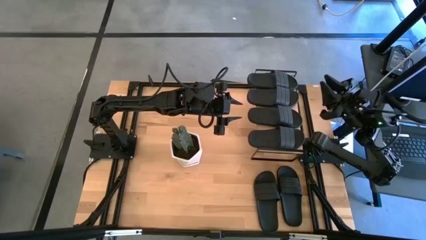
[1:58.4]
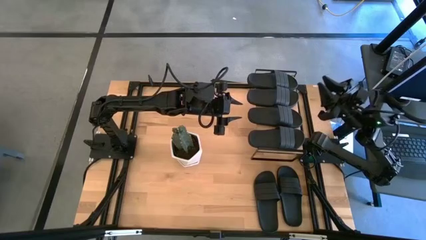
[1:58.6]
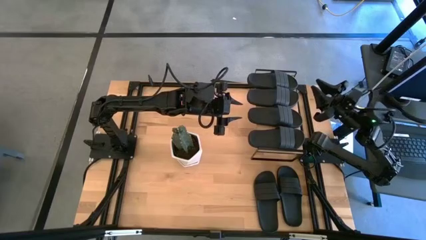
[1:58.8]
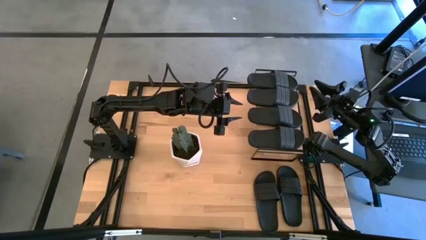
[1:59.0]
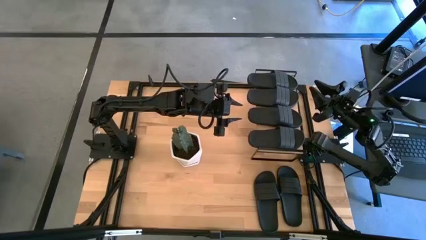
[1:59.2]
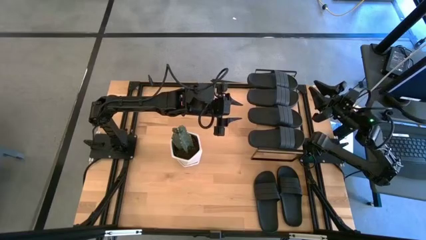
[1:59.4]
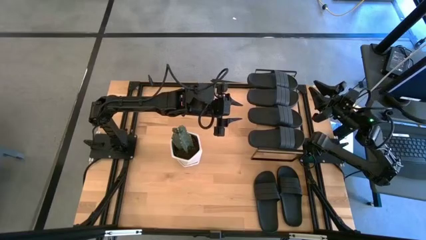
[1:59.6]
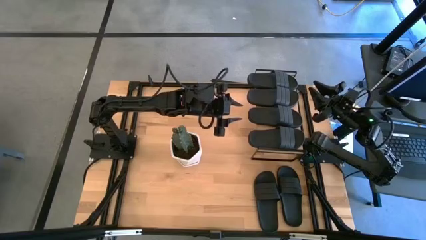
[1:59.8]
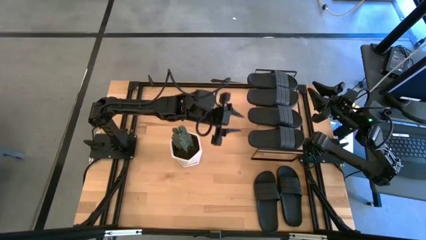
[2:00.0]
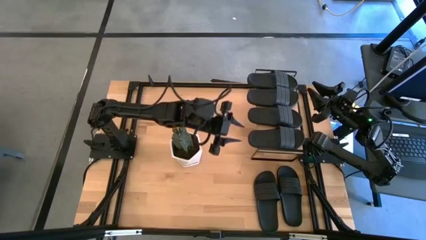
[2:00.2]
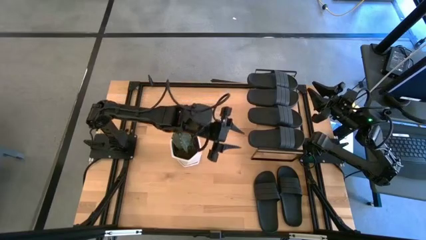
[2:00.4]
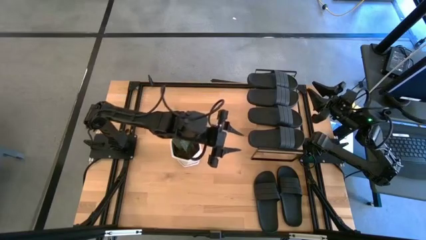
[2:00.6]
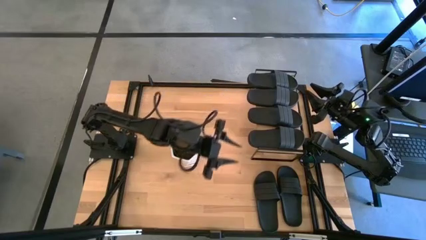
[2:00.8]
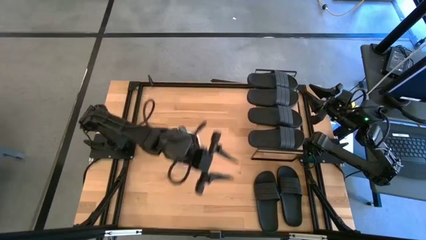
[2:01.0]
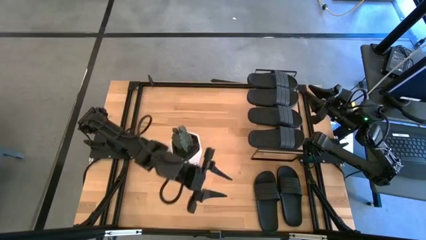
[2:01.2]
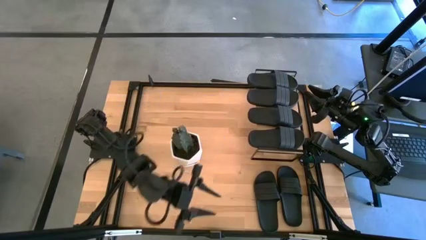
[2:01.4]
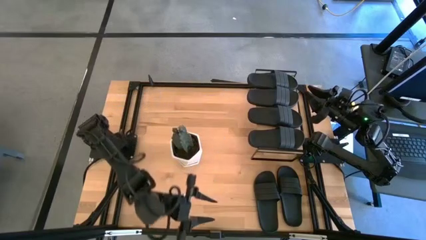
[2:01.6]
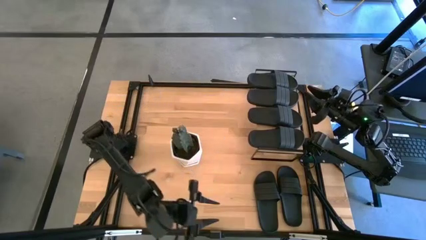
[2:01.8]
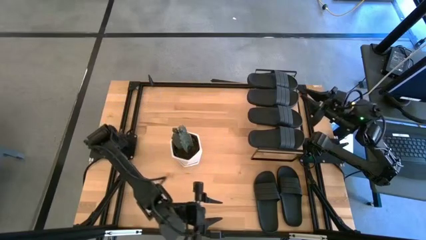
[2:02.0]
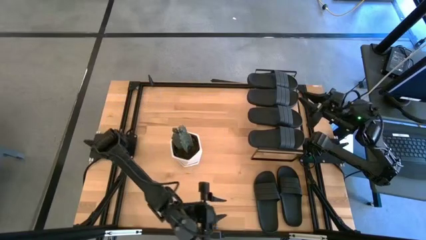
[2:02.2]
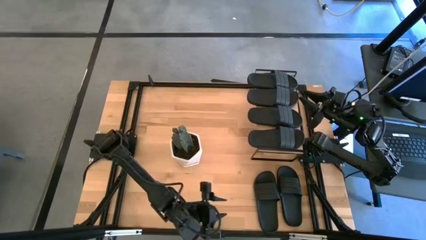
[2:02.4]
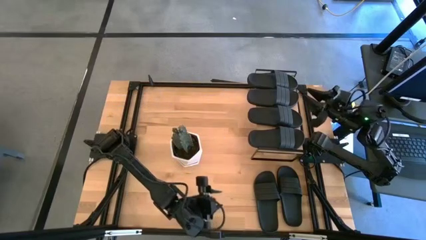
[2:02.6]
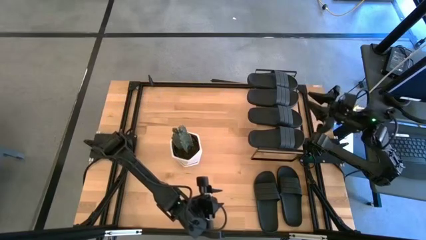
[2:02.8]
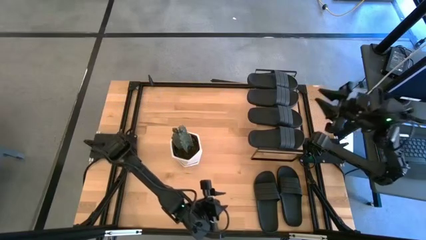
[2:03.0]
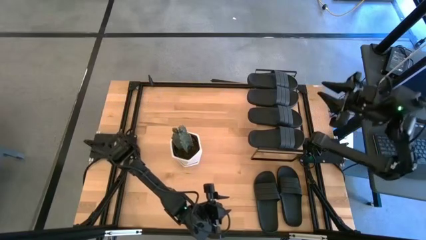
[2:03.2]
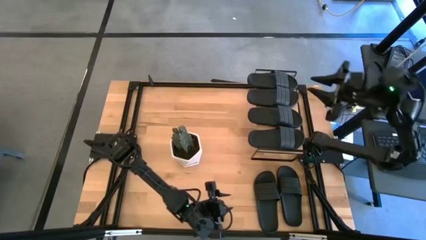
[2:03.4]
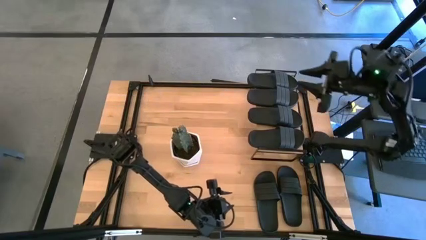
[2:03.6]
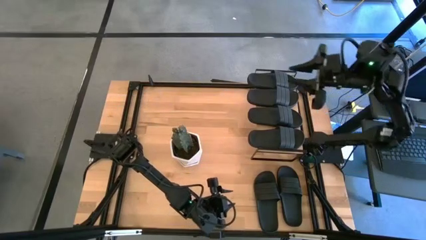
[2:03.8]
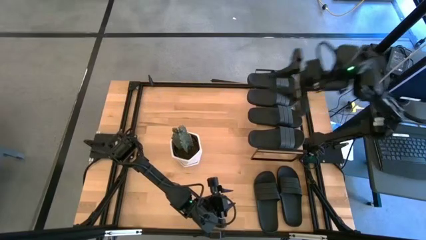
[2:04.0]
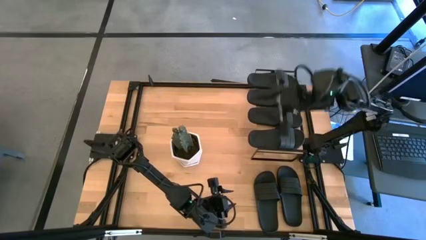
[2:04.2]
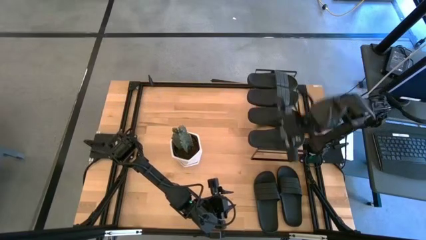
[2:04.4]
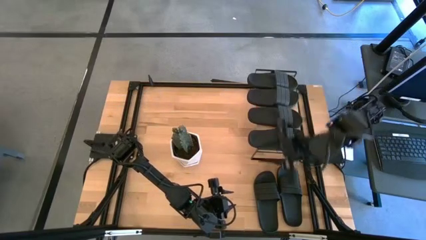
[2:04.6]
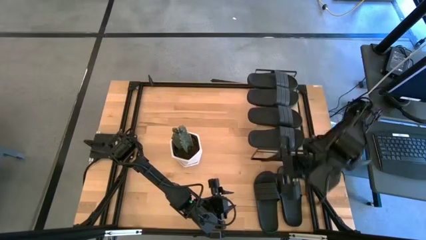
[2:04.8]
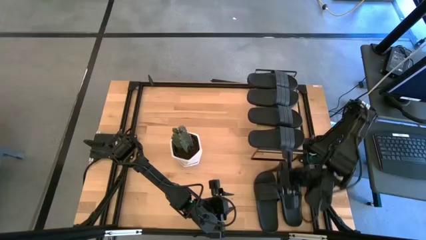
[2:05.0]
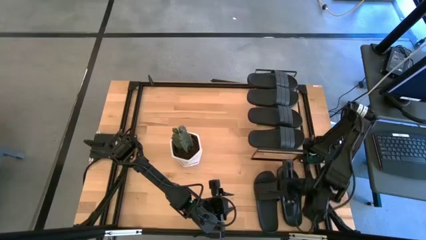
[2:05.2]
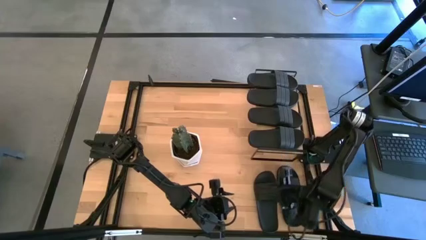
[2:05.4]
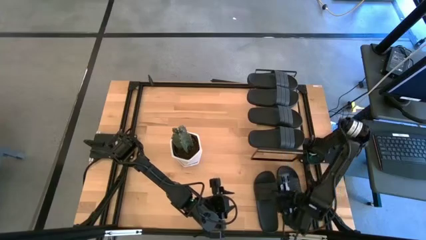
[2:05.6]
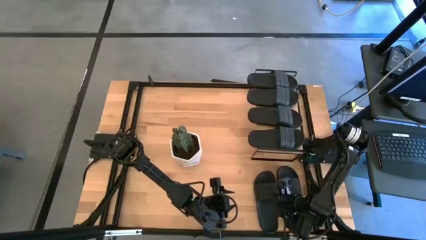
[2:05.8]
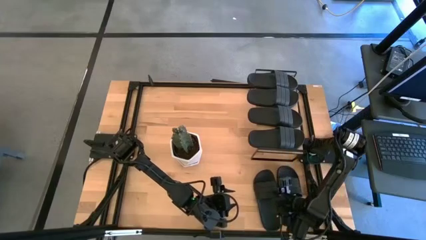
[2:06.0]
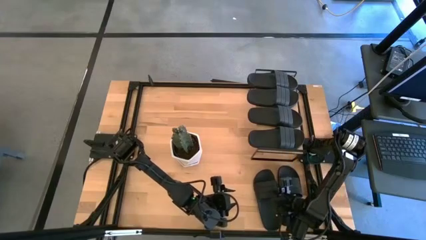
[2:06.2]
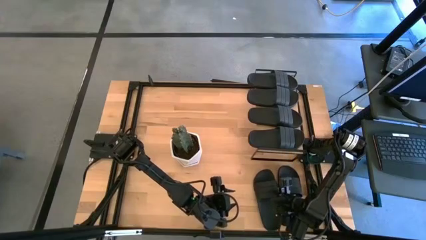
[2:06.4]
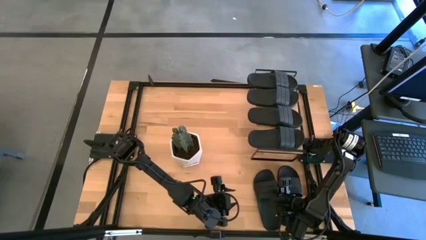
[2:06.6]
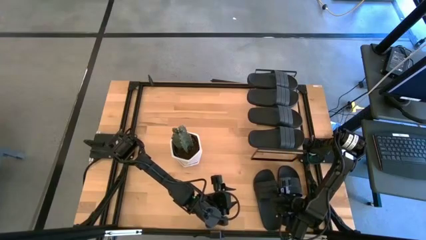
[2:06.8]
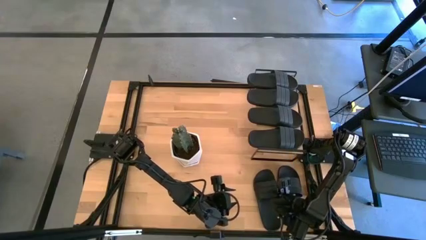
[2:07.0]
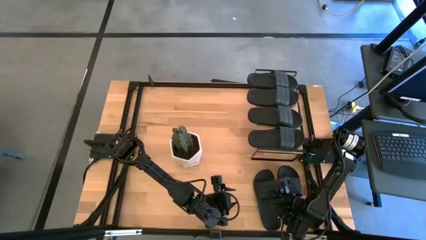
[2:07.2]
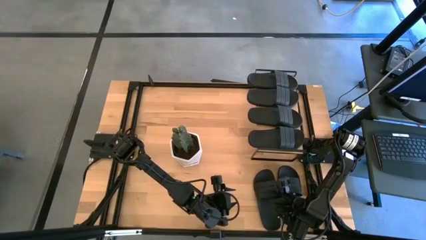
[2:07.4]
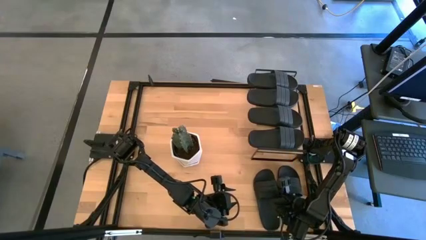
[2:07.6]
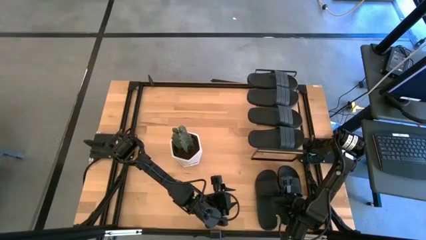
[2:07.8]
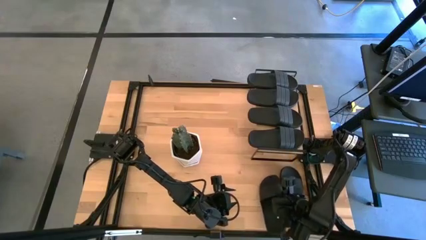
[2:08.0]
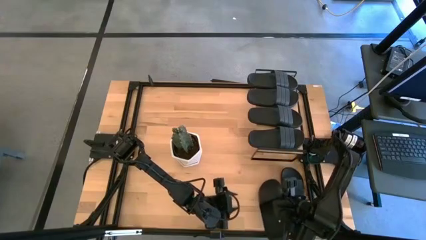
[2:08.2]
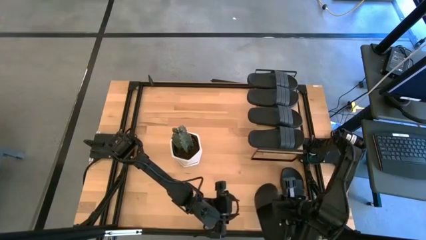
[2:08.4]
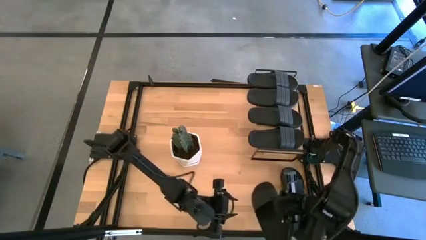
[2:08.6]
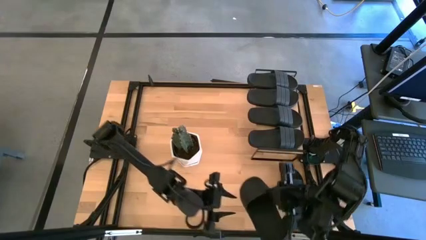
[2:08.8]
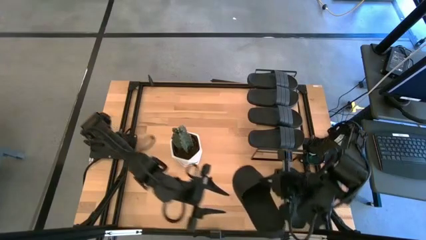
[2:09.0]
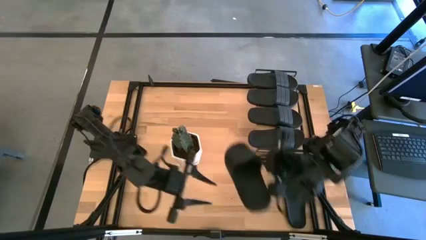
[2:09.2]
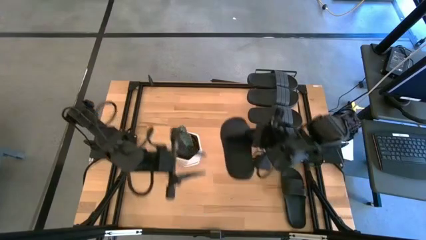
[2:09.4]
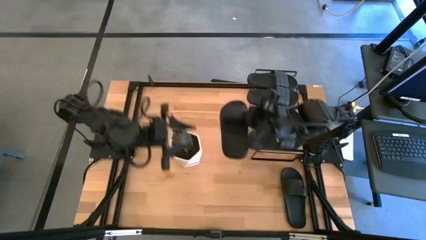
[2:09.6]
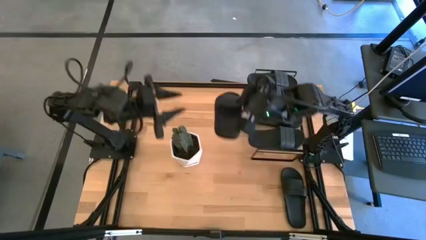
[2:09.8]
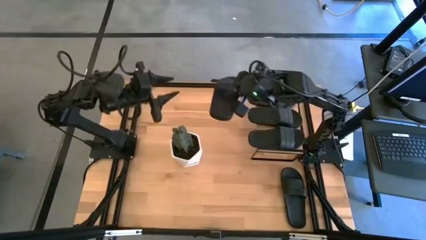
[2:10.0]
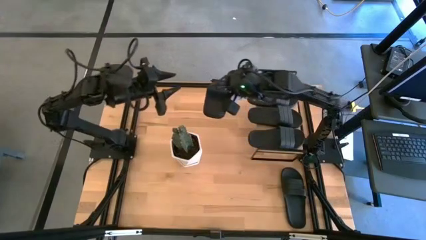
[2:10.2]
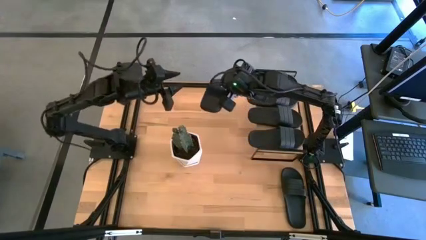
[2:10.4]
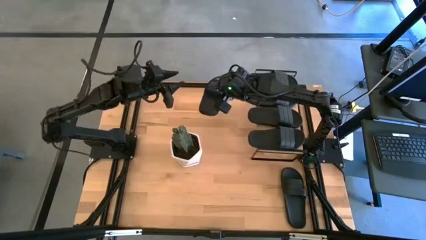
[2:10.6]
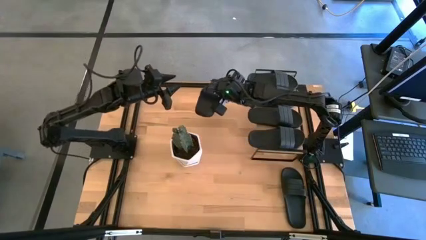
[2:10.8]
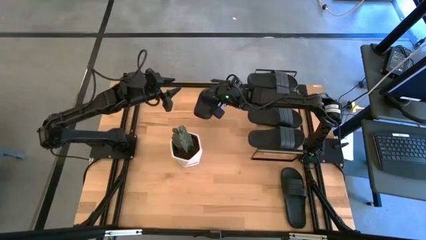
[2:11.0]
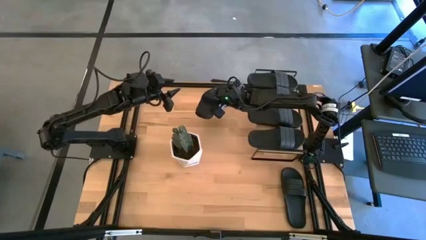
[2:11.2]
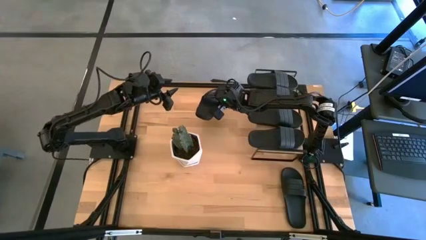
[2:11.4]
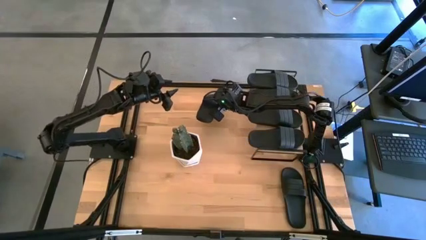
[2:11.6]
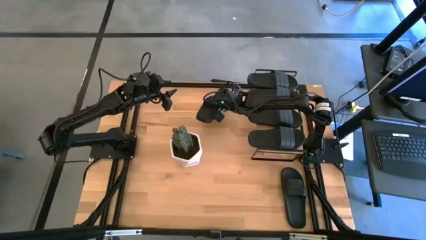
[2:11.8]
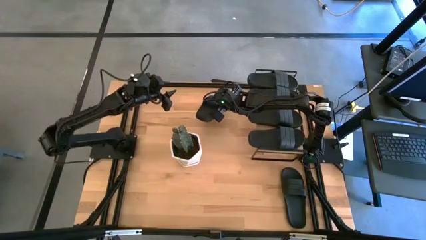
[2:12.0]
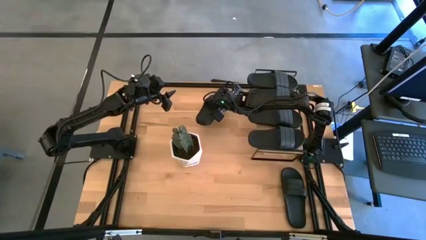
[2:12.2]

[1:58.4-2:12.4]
Task: Pick and place slides into the shelf
Move the black slide to the top center of the table
